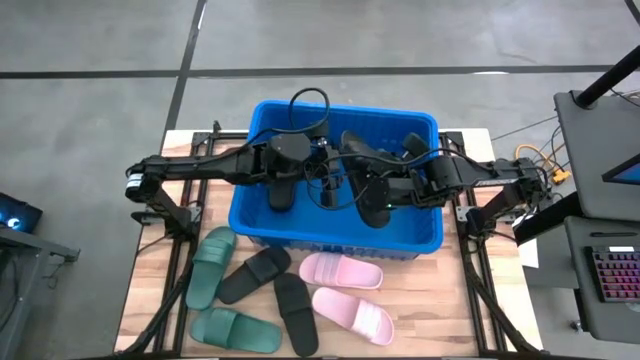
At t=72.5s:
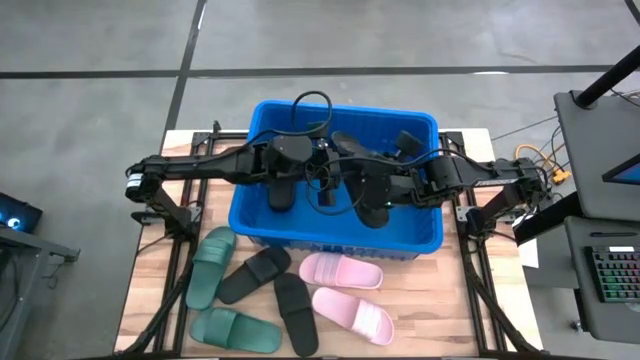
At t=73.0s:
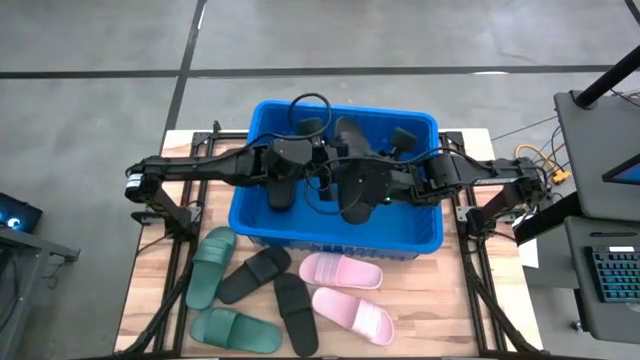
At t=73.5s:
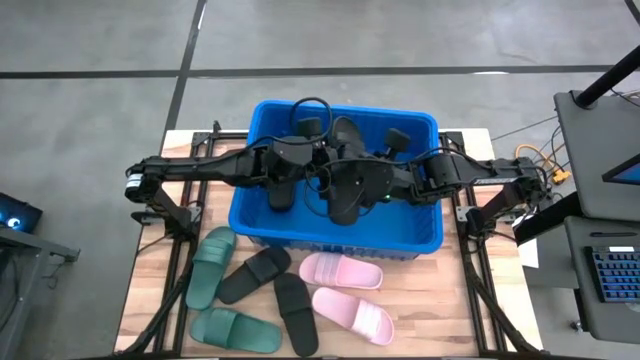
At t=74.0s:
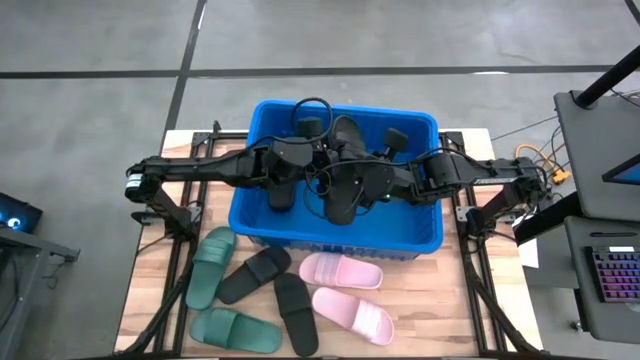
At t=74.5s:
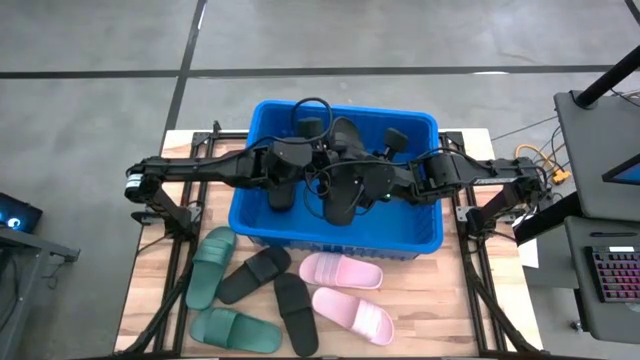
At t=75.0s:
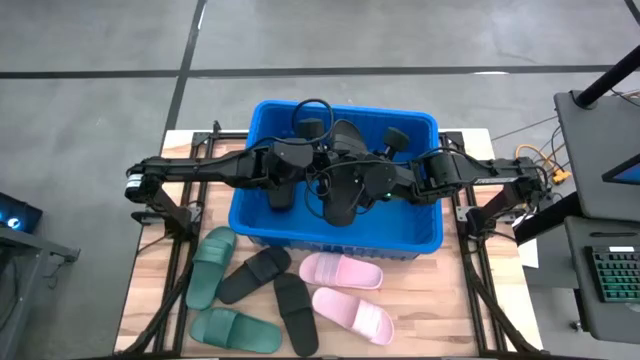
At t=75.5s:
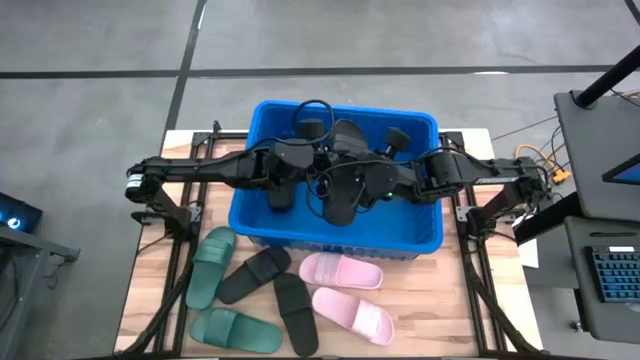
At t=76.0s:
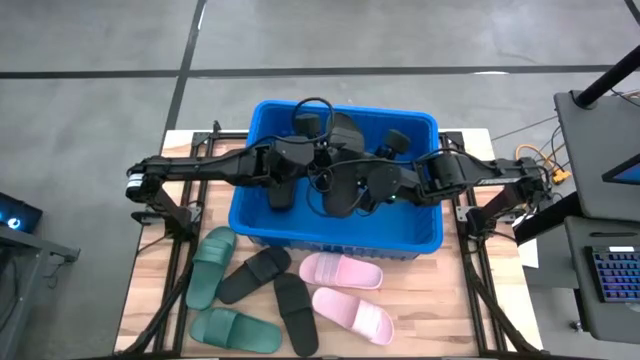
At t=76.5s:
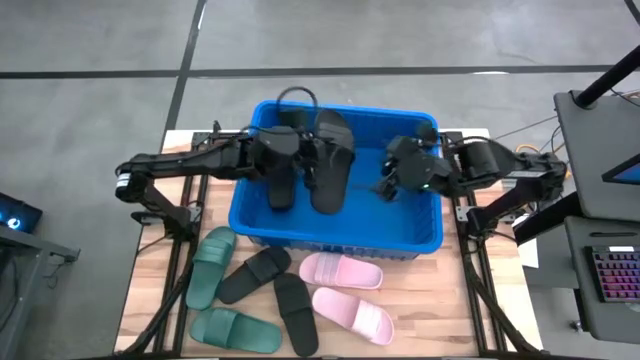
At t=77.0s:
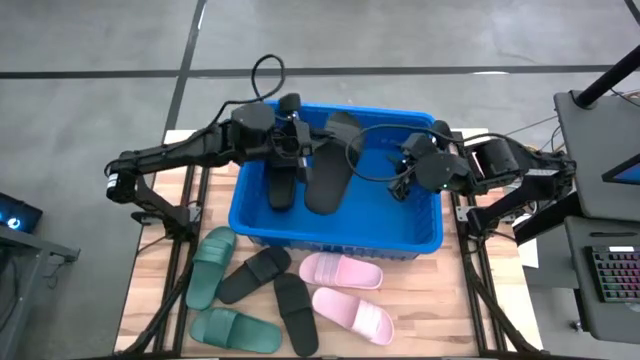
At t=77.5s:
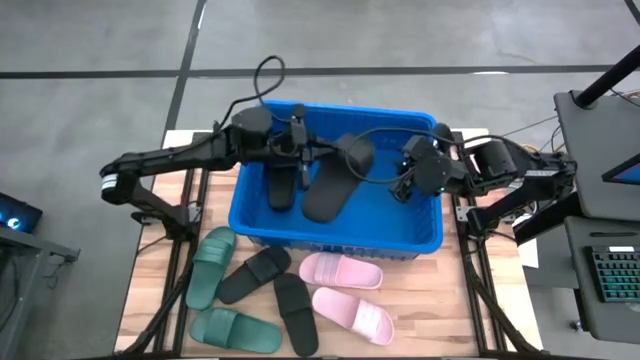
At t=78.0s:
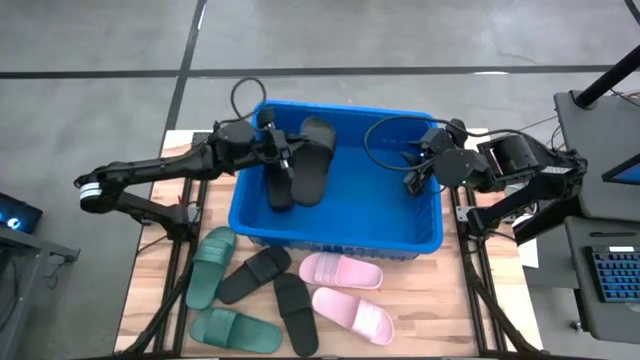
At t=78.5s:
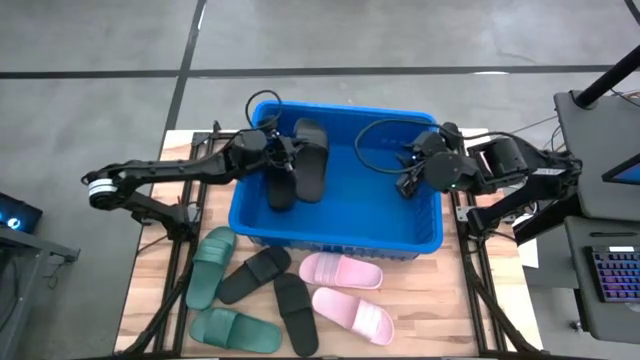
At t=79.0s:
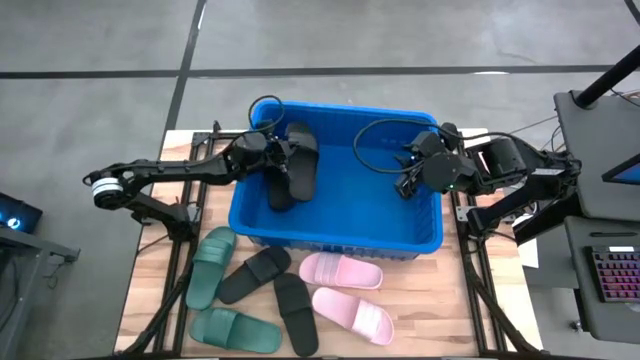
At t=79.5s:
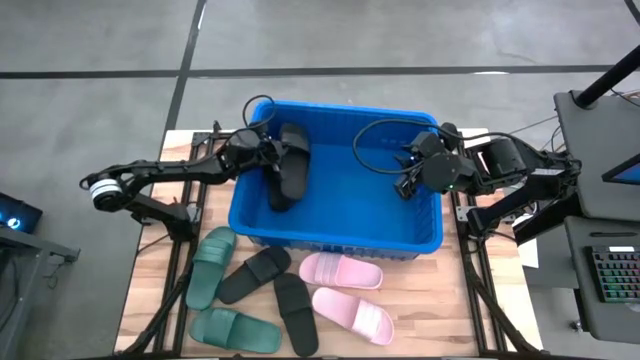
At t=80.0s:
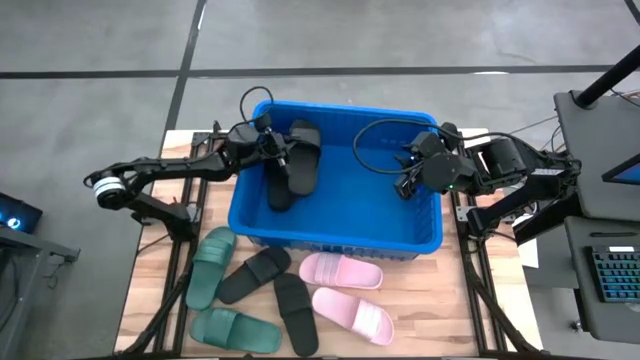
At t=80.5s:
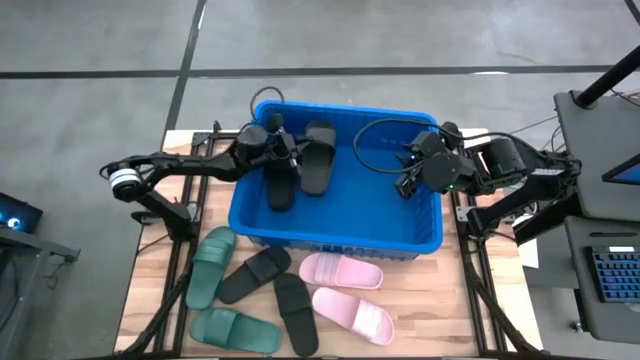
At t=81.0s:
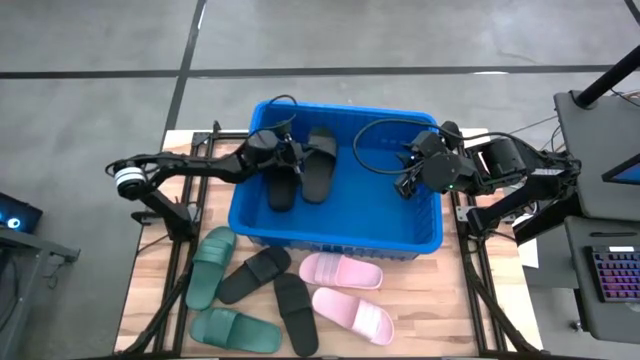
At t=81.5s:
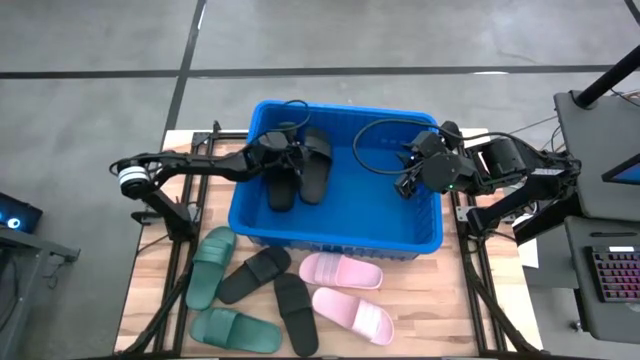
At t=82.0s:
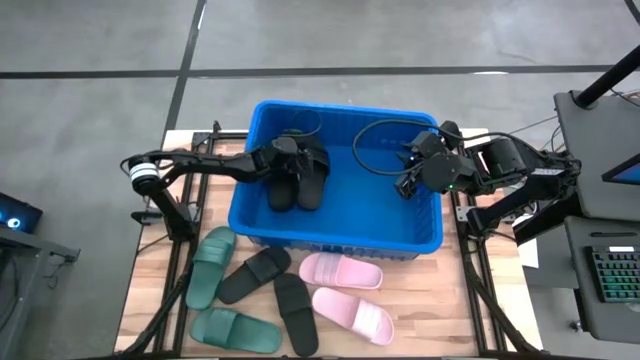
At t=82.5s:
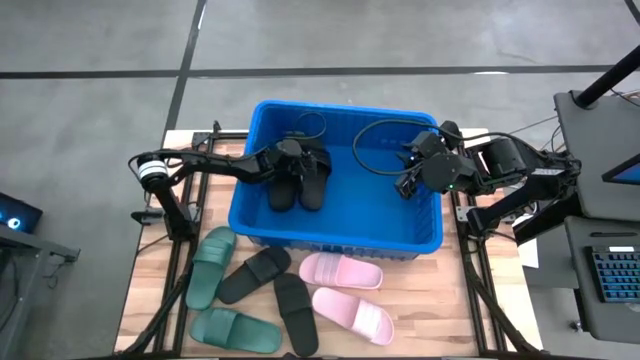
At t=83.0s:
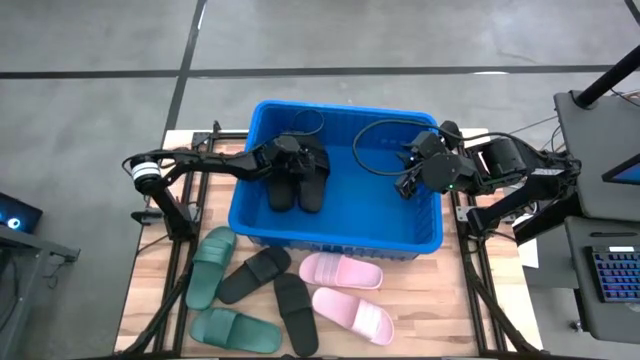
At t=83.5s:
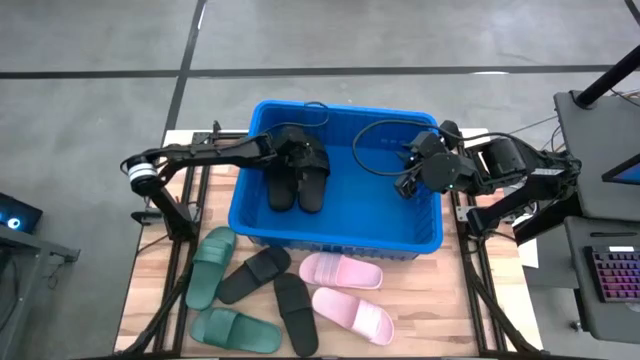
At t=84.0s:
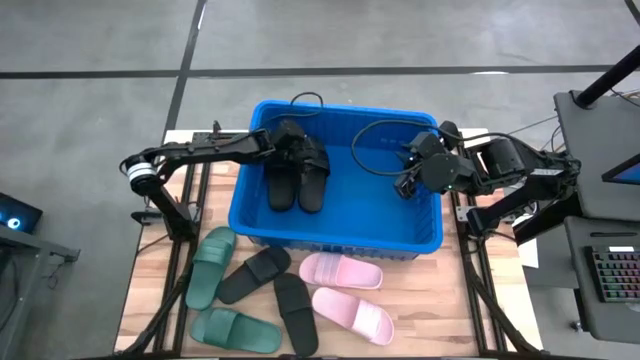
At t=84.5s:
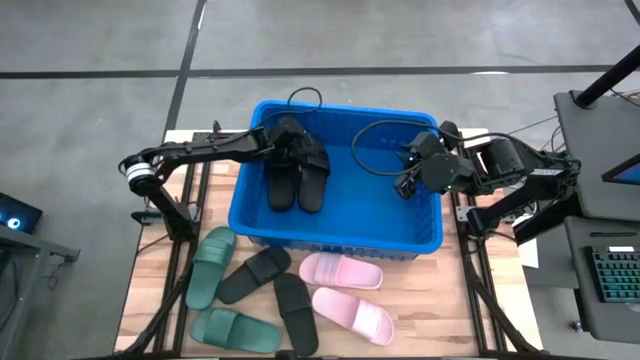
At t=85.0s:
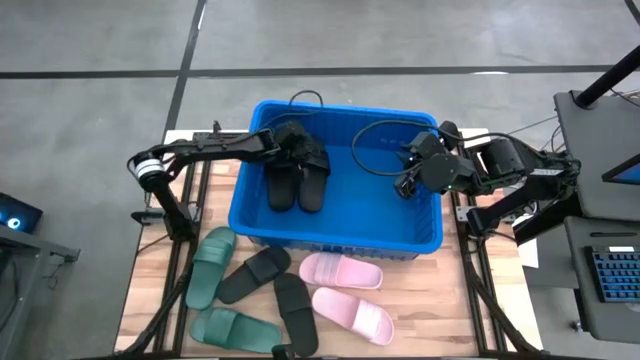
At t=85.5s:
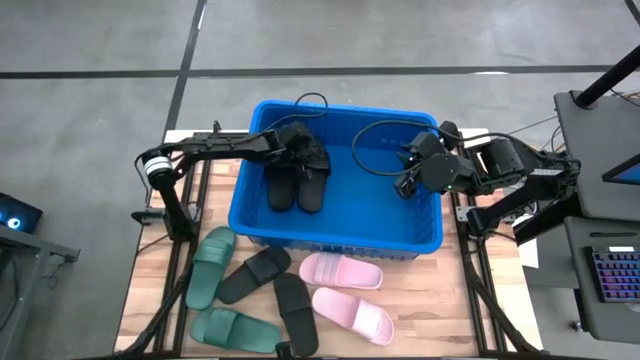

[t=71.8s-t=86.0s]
Task: Pick and place slides into bin
Put the Bottom right black slide into the blue bin

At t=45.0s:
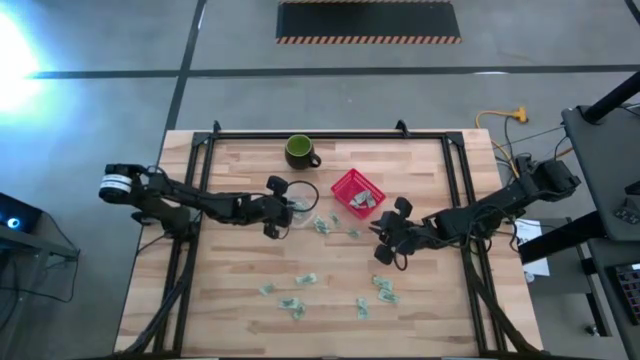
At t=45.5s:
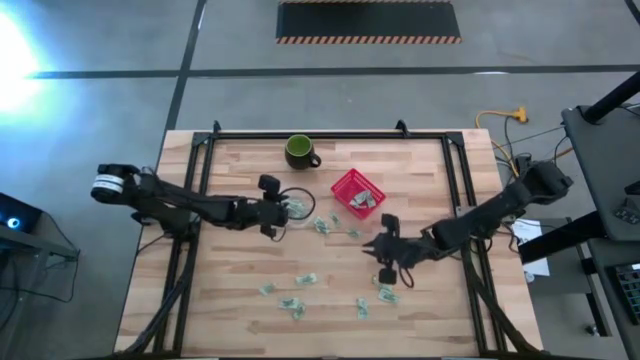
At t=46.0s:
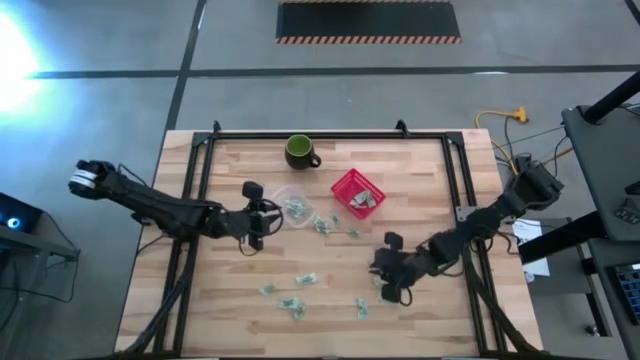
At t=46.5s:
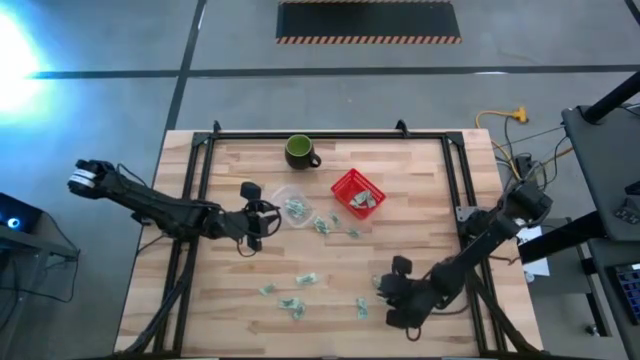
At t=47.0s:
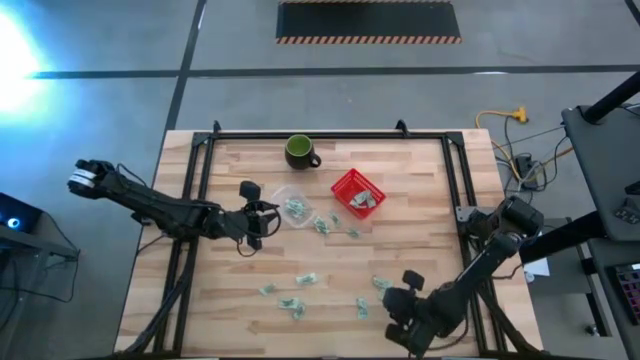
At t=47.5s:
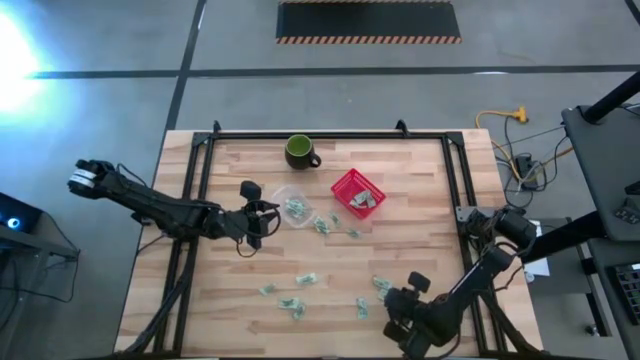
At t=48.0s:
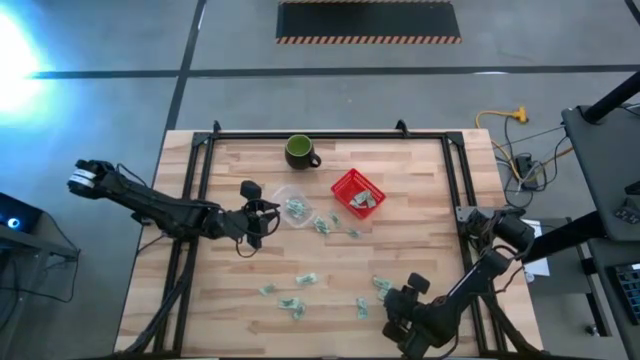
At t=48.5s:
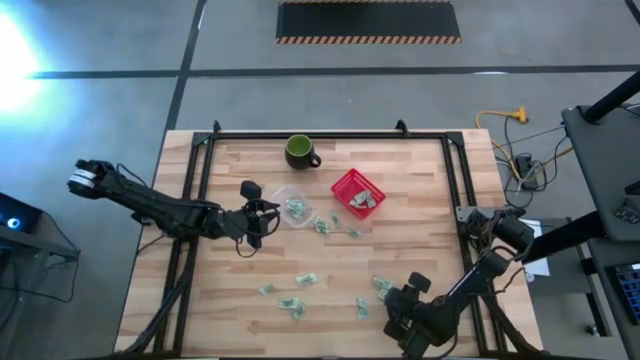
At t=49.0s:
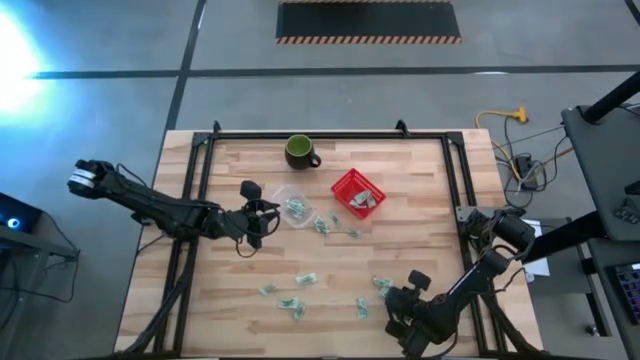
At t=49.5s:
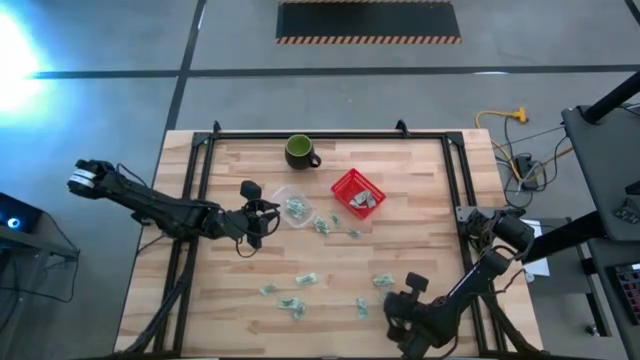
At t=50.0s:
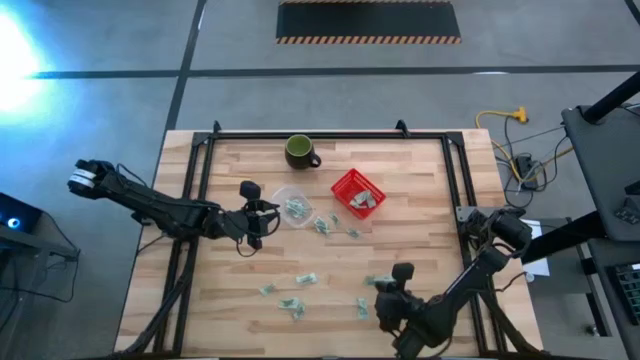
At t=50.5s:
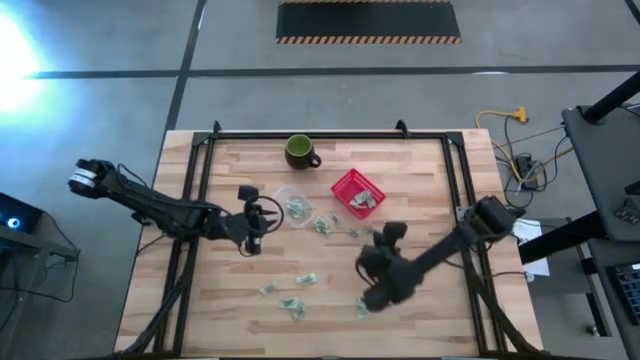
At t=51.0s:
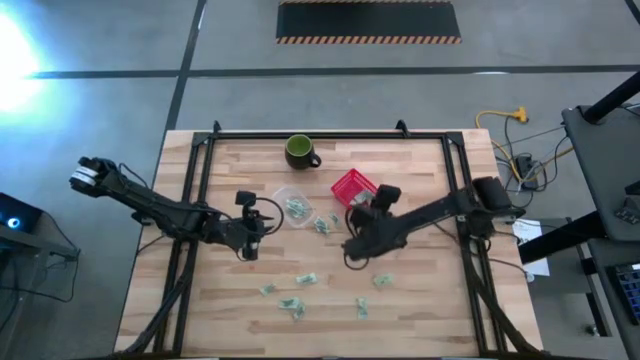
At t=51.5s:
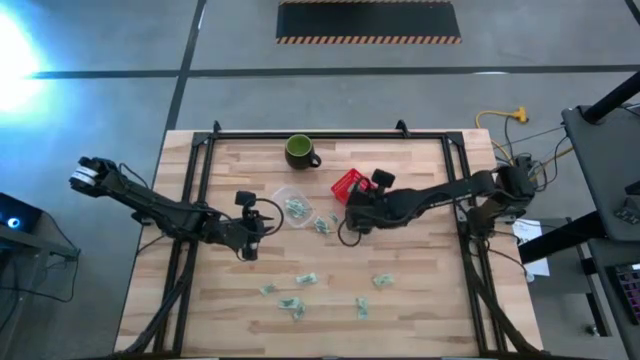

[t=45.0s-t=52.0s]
Task: Pick and place items into bin
Put the stevia packet into the red bin
